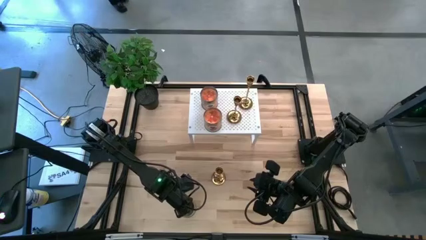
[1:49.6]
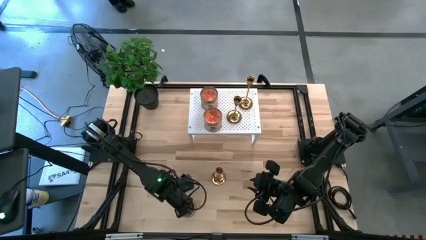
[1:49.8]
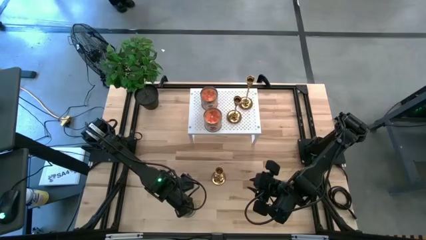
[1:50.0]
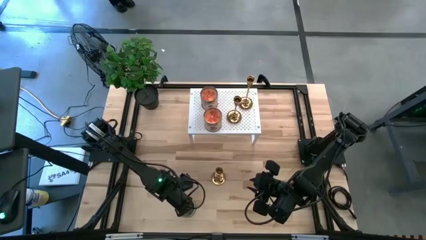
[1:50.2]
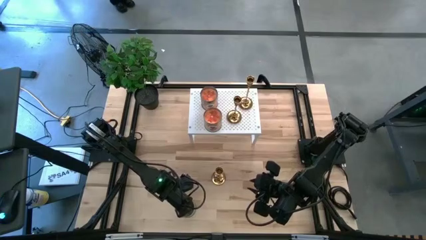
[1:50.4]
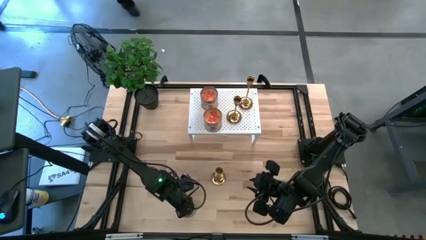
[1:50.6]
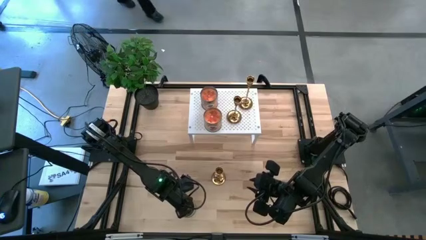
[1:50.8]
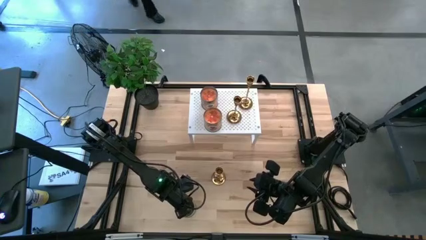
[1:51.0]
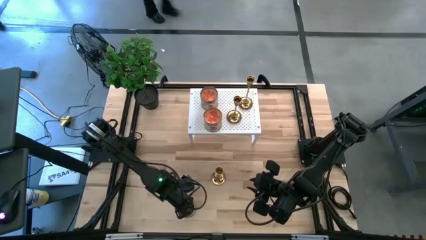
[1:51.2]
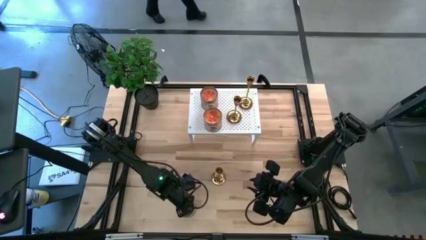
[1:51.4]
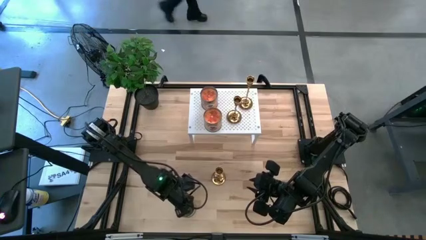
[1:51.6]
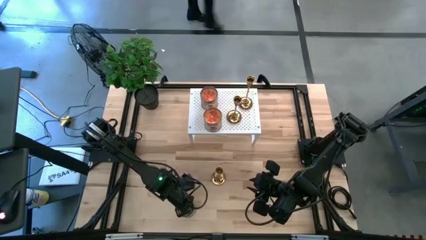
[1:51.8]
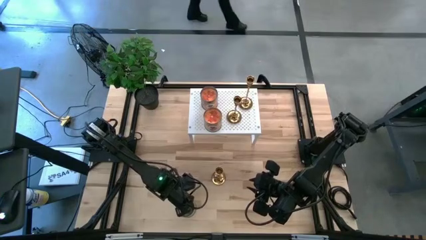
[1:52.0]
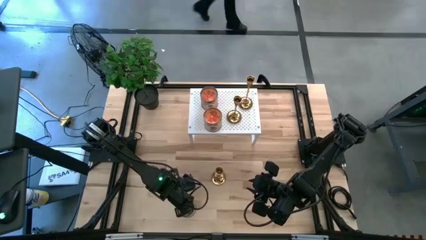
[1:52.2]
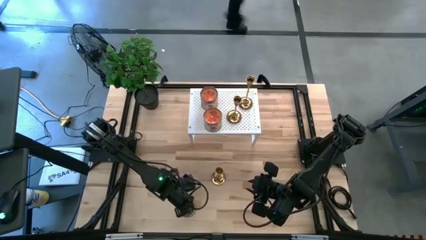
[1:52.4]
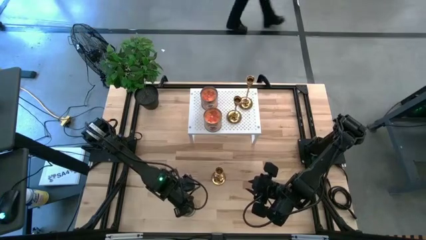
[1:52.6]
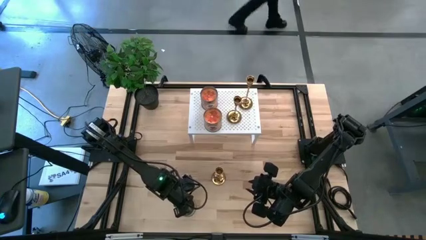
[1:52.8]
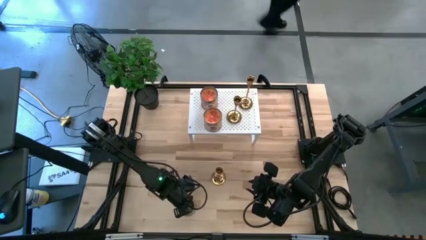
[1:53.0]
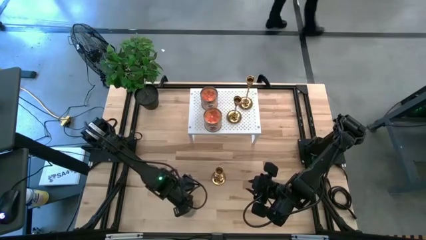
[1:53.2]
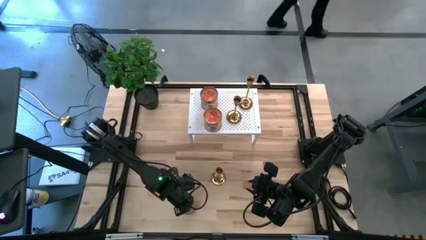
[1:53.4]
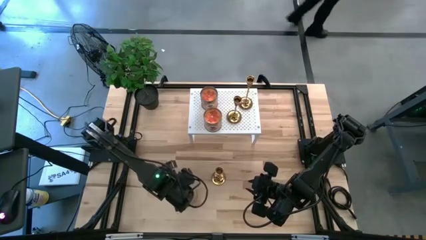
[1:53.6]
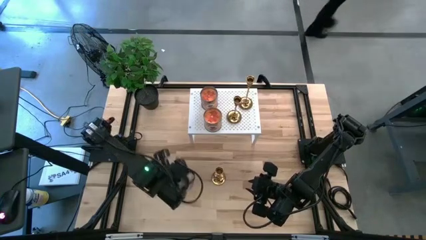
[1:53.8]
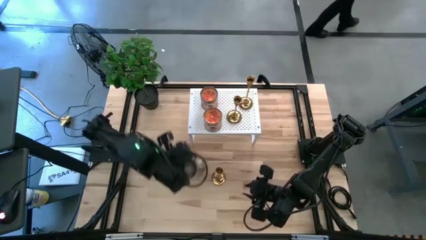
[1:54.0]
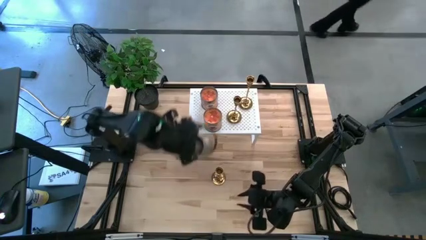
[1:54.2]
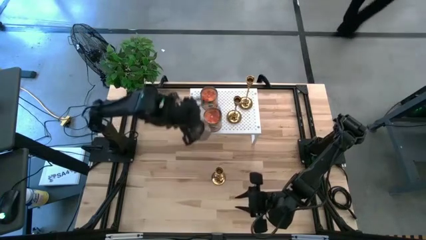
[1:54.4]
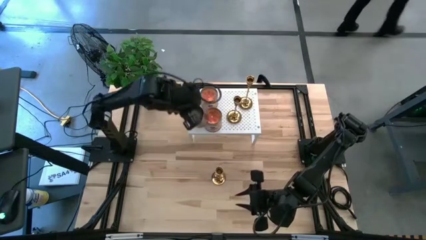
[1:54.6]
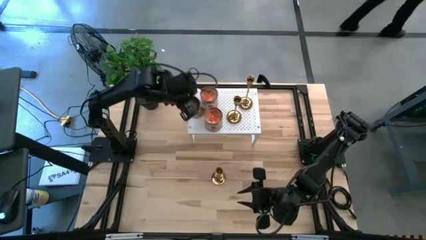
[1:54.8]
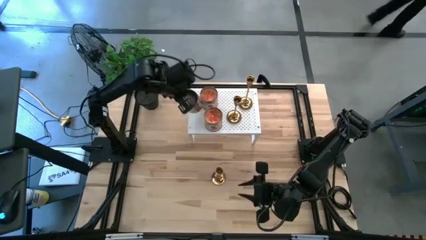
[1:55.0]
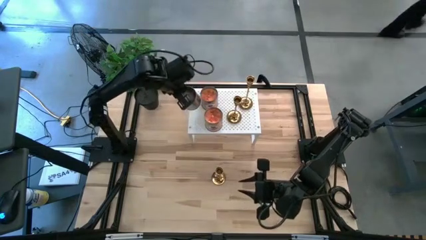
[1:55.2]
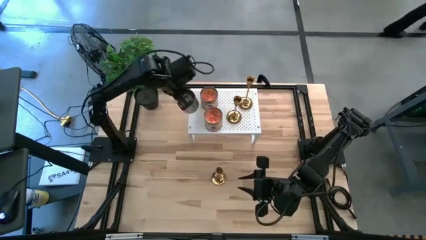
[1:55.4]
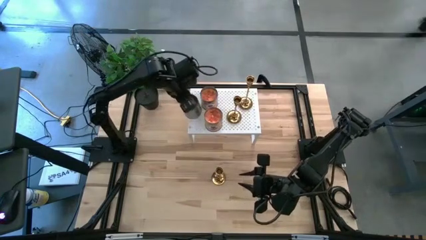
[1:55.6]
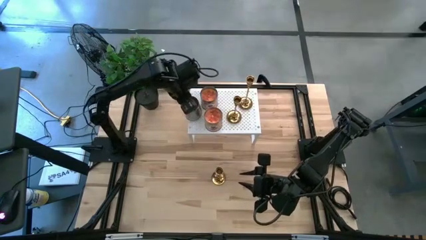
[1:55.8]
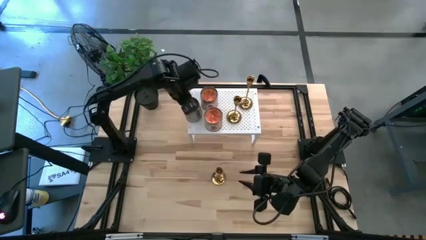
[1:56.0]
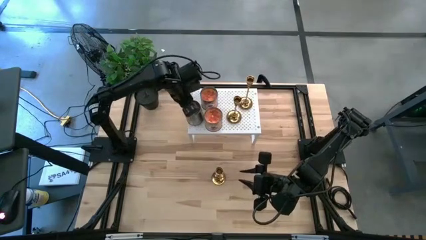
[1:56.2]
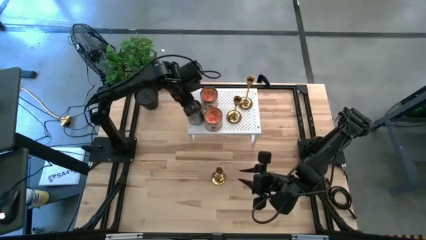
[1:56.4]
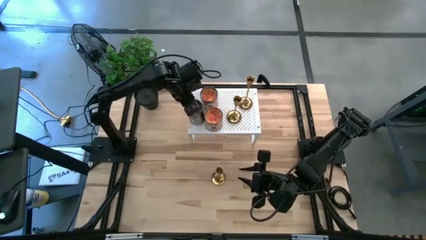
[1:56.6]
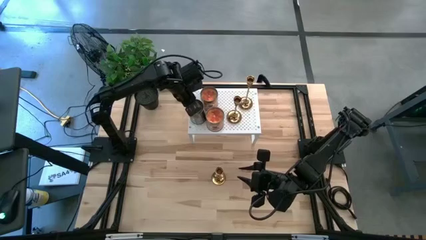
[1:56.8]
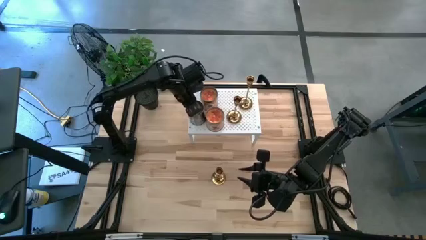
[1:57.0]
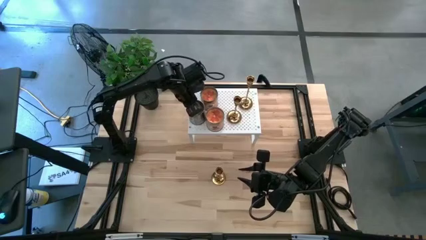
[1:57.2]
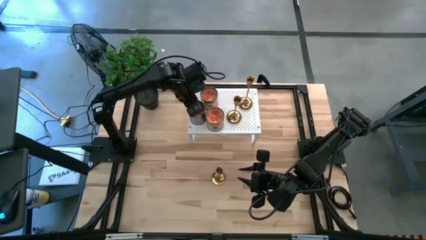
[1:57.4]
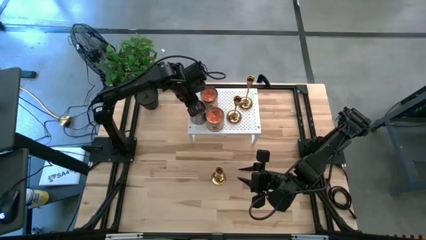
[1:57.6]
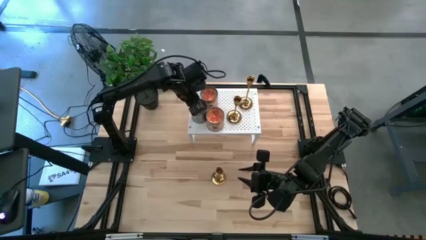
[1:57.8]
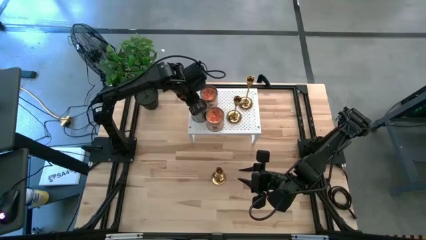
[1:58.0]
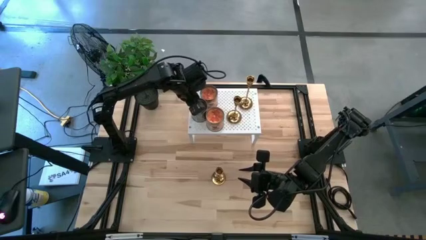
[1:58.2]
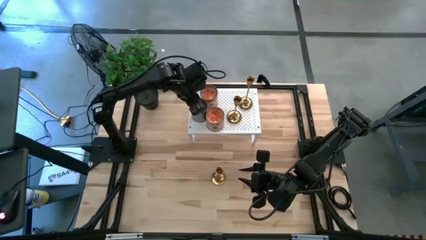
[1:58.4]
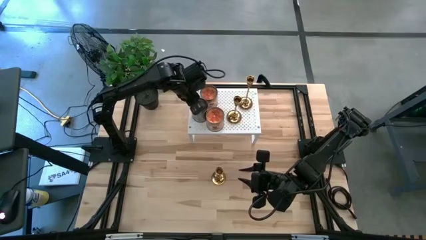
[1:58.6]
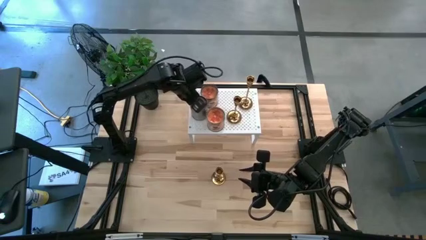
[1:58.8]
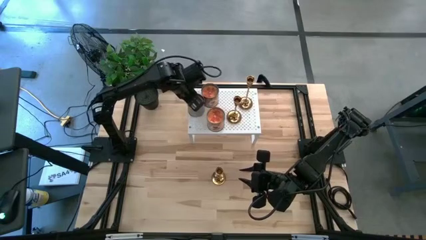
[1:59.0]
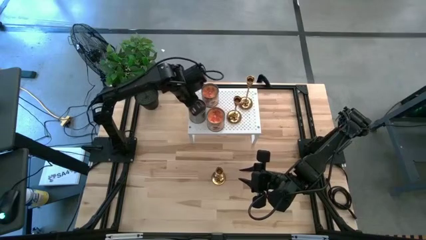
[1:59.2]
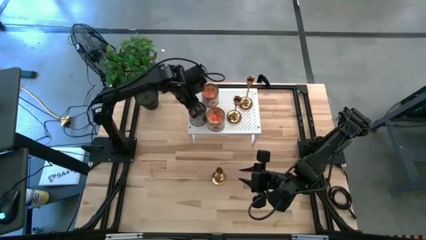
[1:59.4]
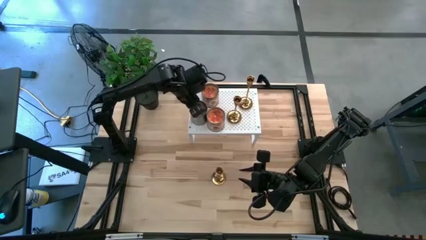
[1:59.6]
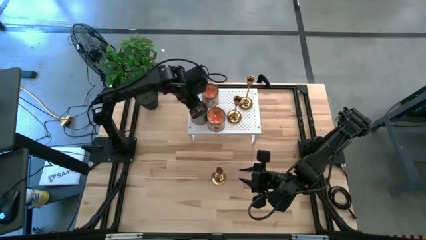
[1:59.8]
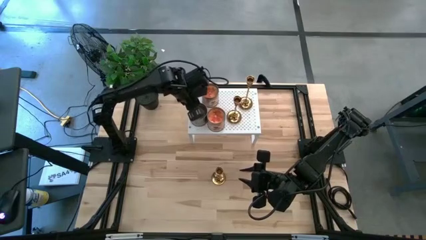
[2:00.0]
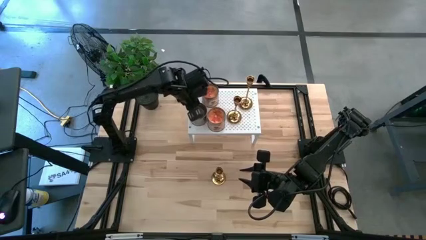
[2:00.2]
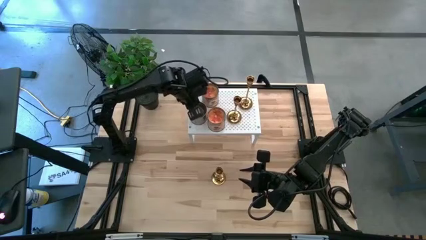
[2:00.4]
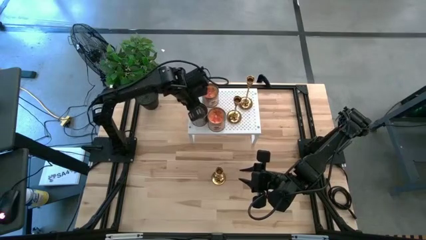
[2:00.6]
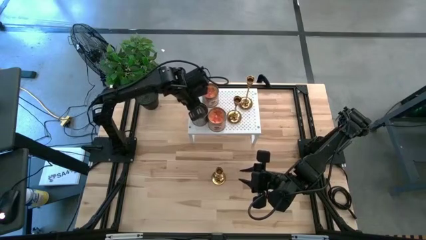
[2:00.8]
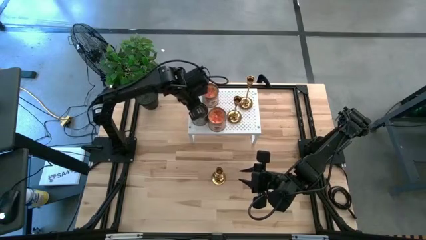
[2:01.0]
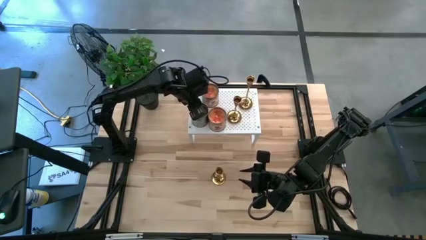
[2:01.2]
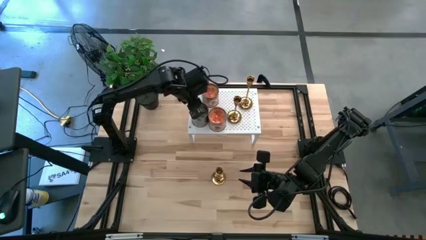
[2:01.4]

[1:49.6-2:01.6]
Task: Pick & Place candle stick holders
Put the brown scented candle on the shelf
